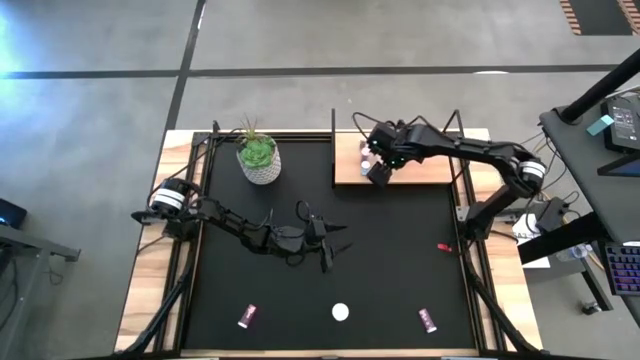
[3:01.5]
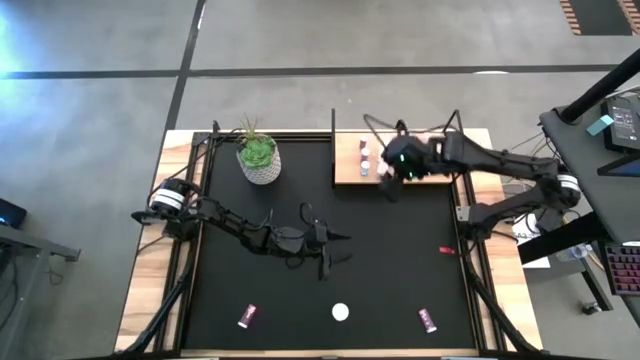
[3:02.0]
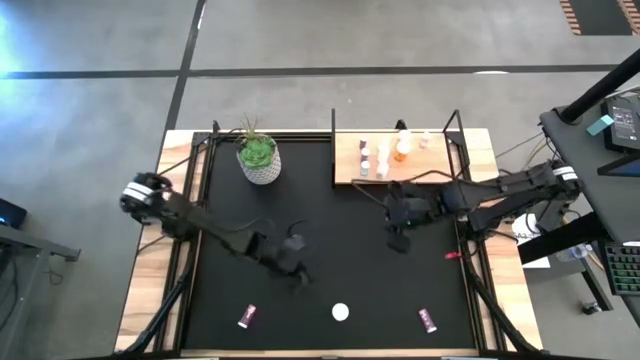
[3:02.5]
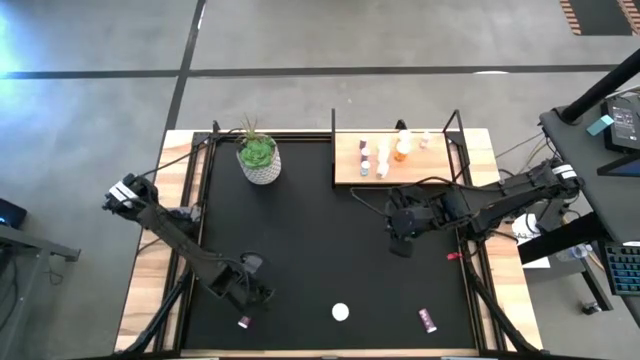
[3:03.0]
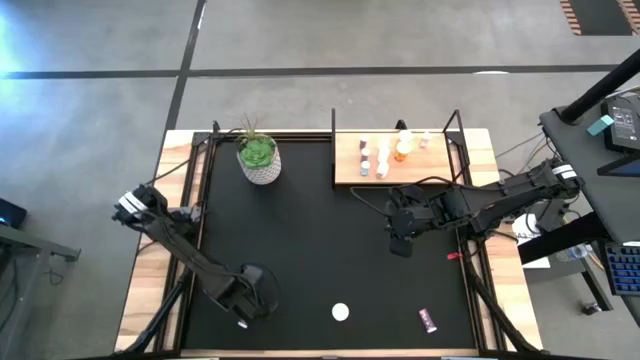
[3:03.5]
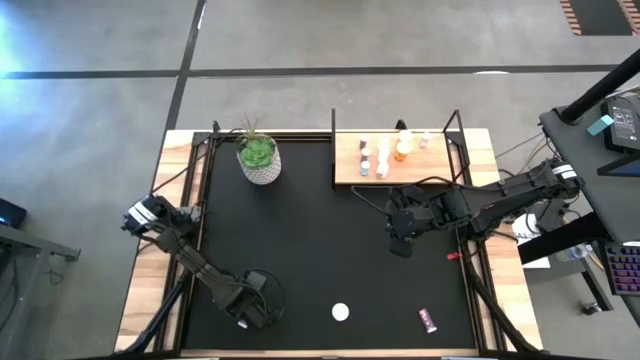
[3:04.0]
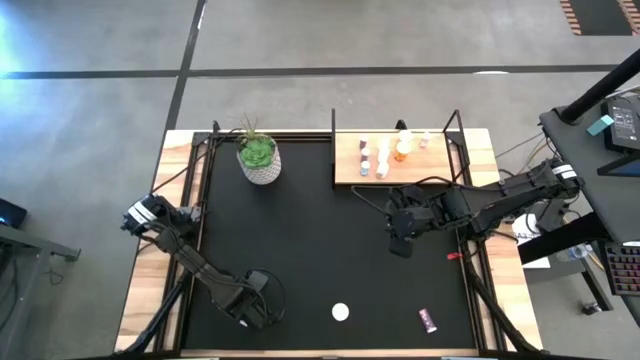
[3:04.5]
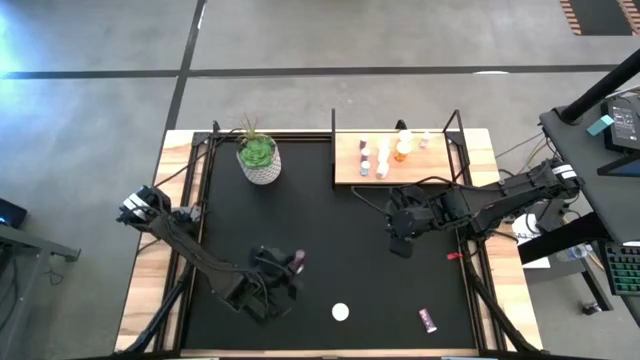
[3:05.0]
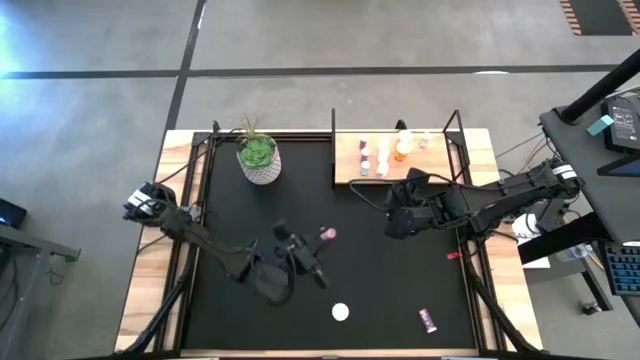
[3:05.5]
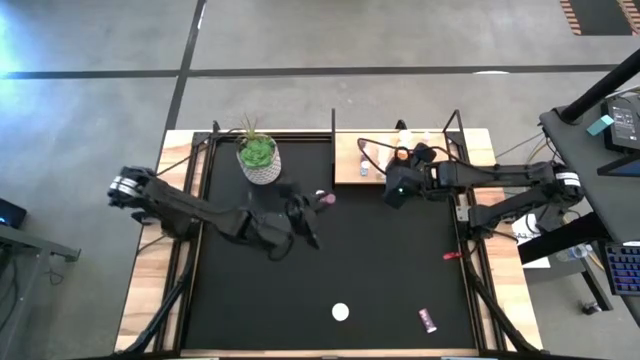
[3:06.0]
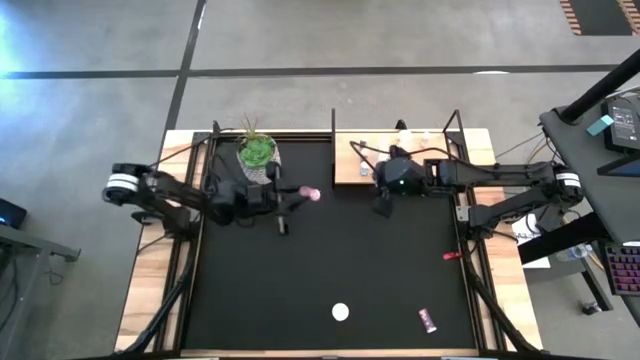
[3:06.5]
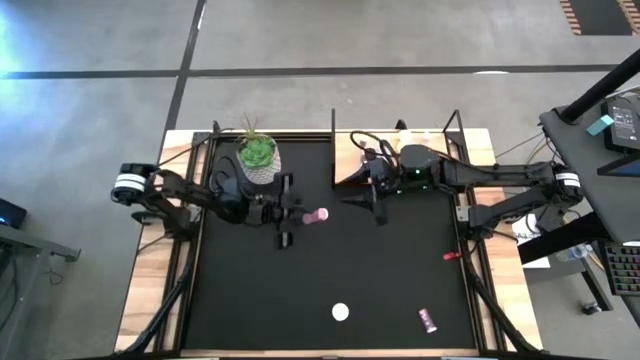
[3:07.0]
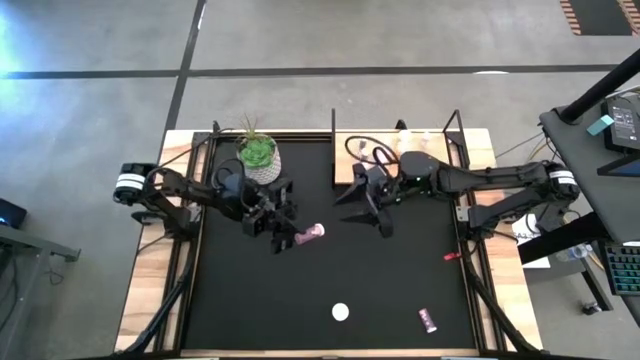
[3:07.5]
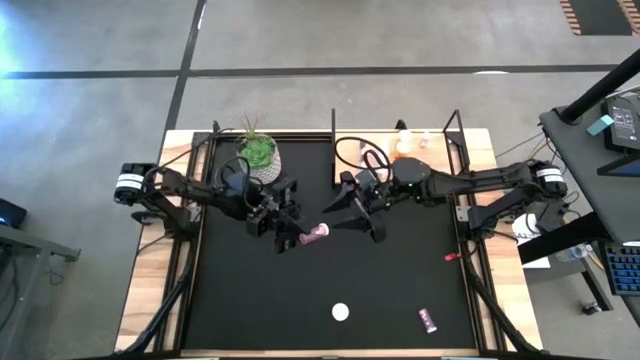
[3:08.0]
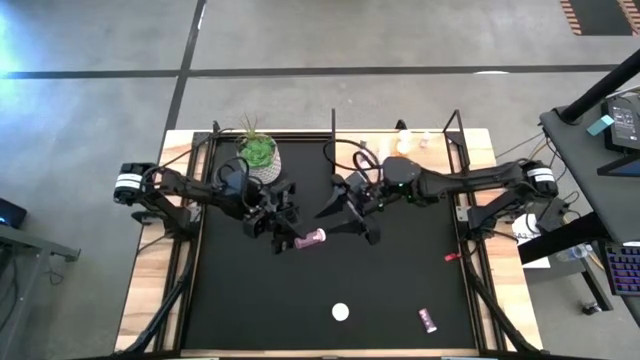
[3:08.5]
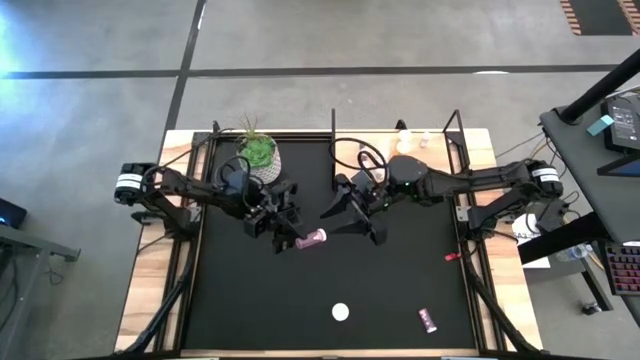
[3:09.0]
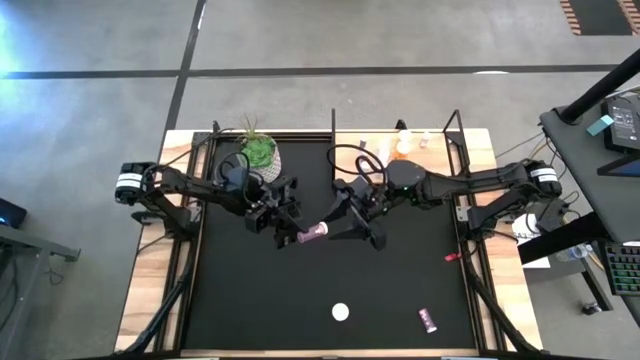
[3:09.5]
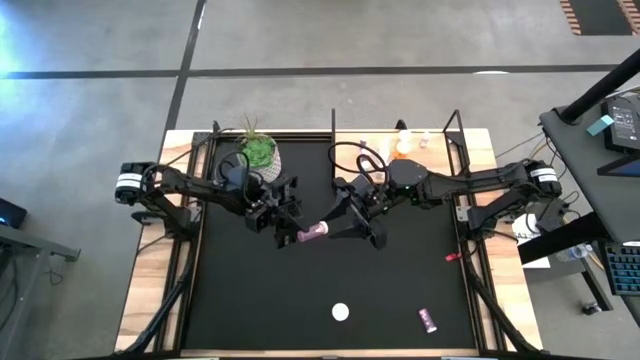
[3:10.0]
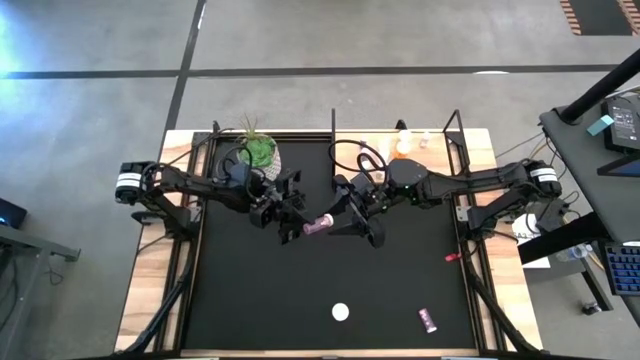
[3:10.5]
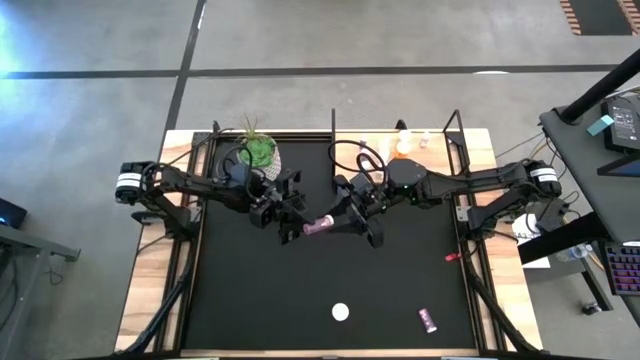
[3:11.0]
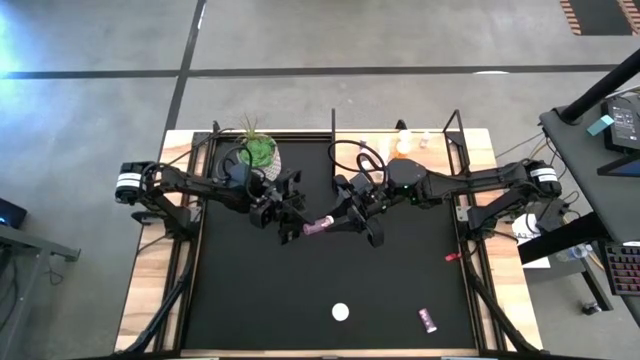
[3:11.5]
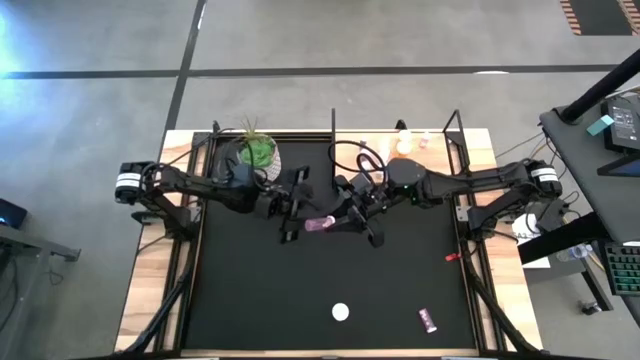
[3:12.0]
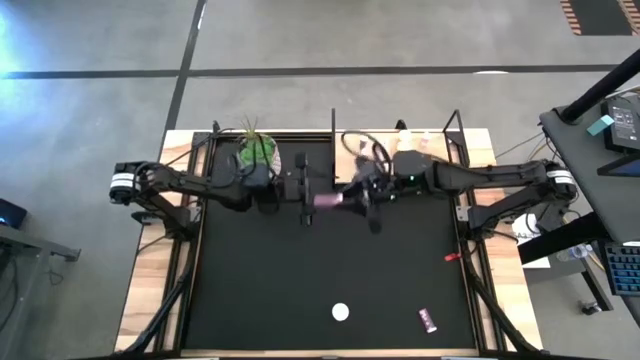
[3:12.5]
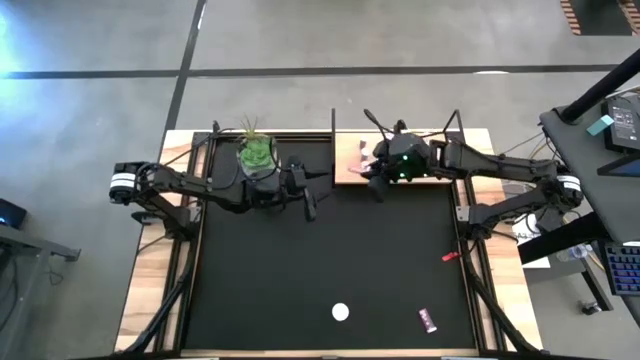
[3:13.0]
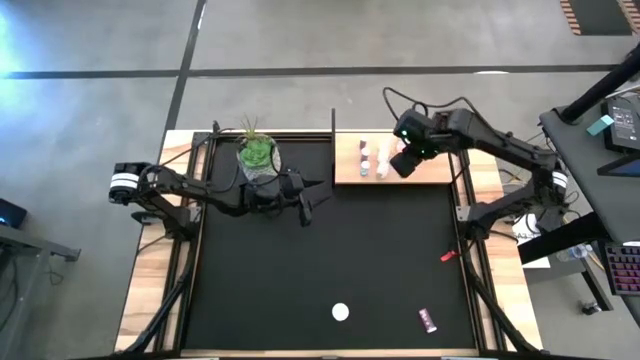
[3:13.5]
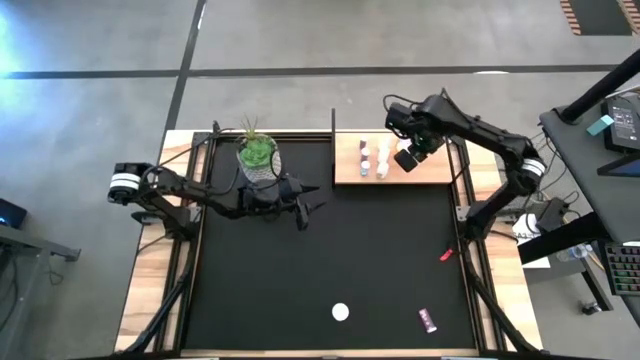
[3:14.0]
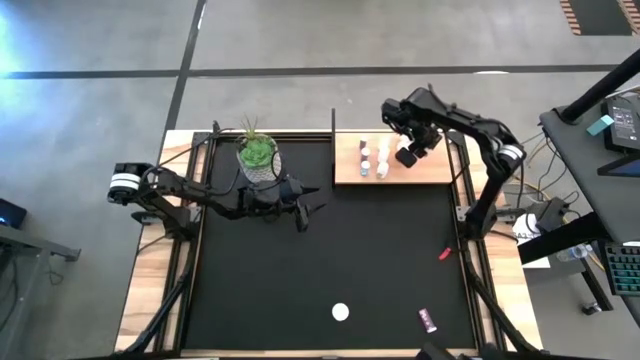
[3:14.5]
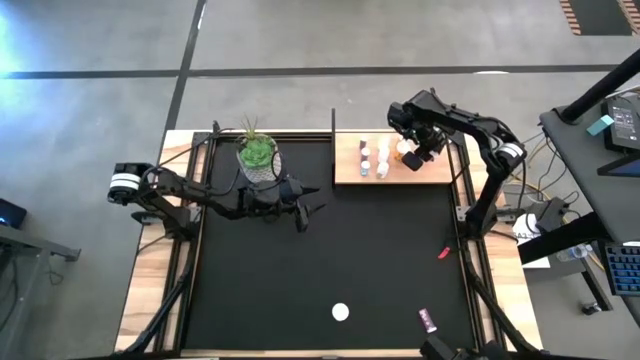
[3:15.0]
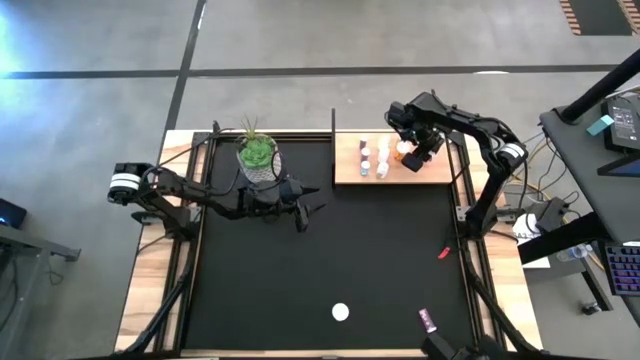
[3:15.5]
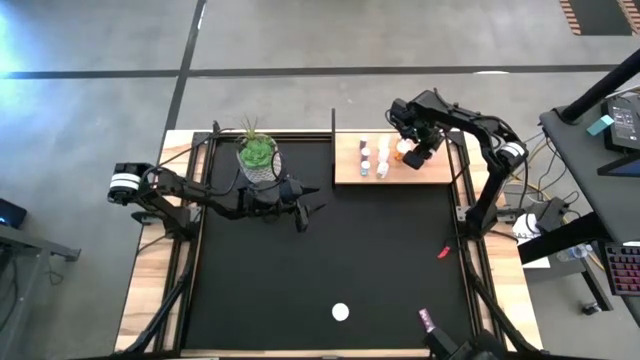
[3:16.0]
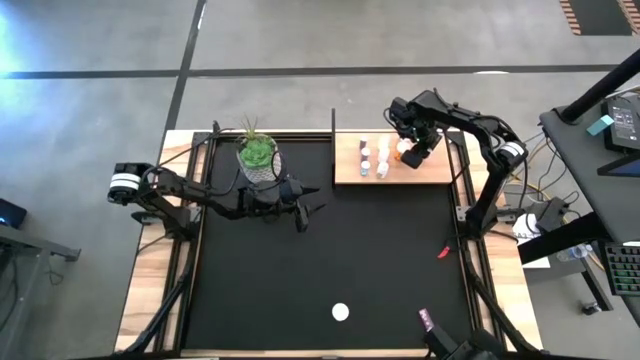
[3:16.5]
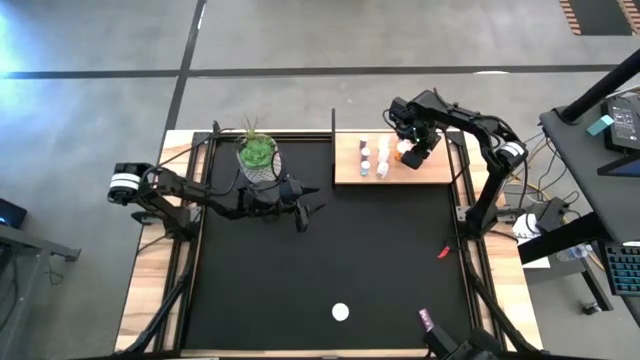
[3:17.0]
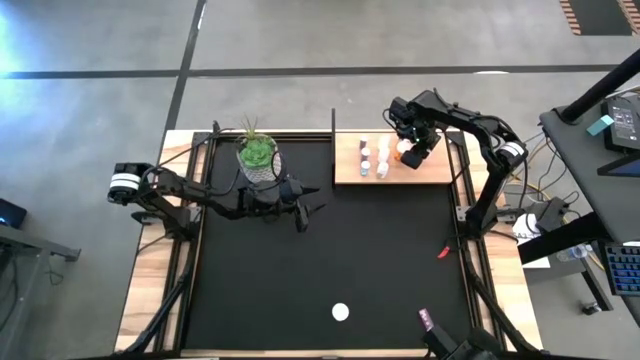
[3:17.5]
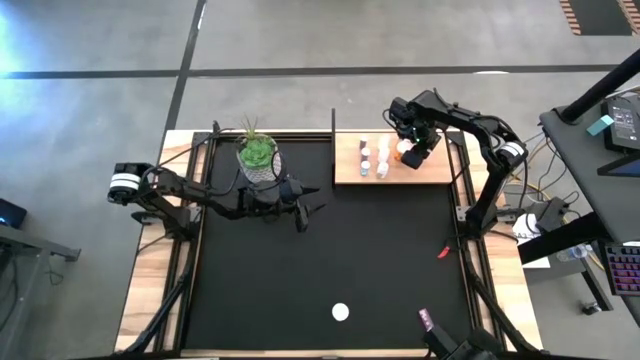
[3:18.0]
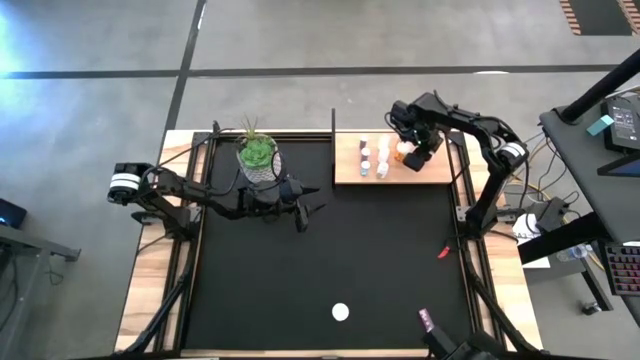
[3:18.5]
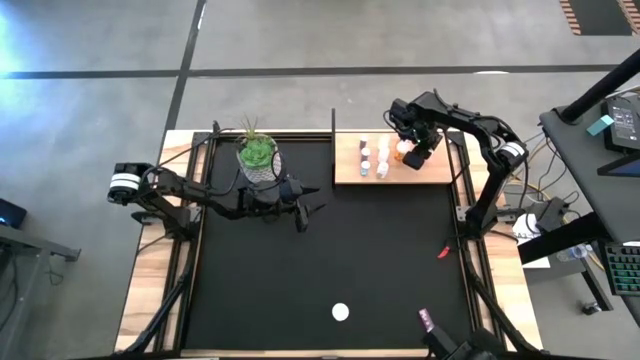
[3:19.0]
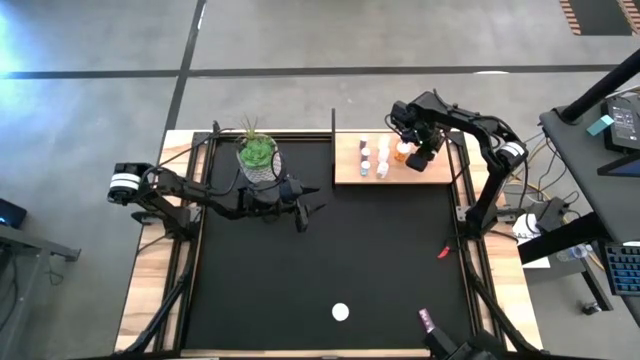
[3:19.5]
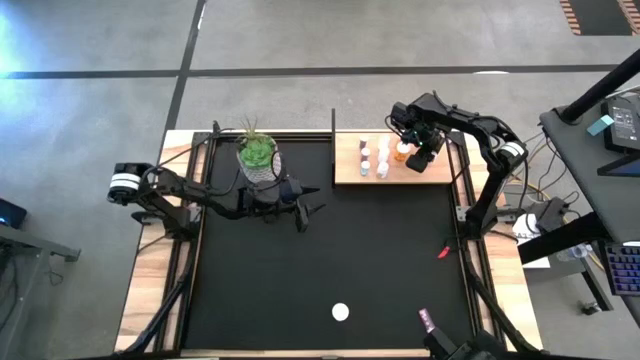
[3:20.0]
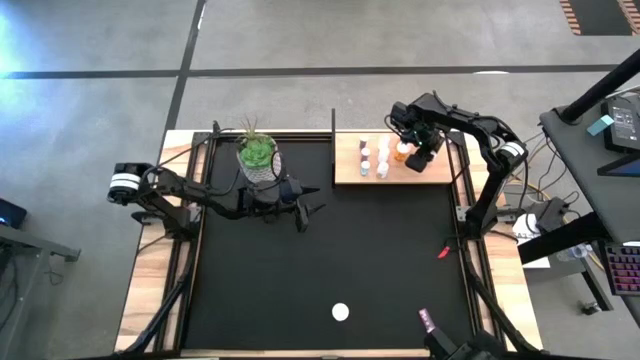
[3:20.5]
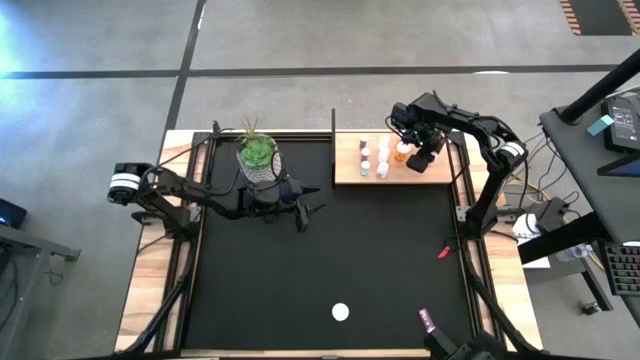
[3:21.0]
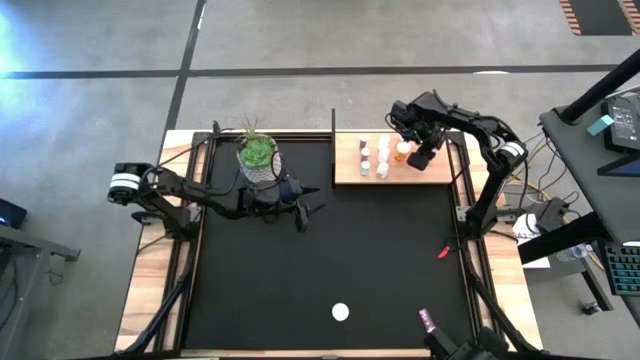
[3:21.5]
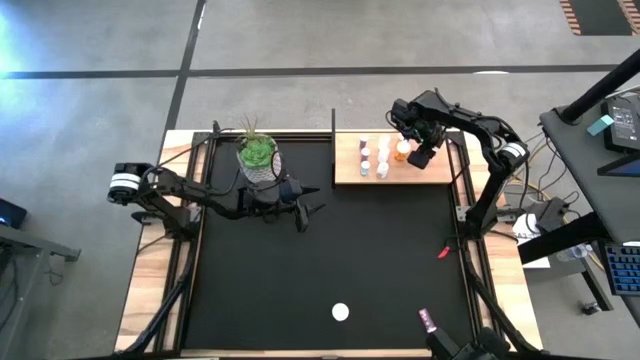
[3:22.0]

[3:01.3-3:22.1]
Task: Pick and place medicine bottles onto shelf by color
Put the left pink pill bottle on the shelf aligned with the other pink pill bottle
